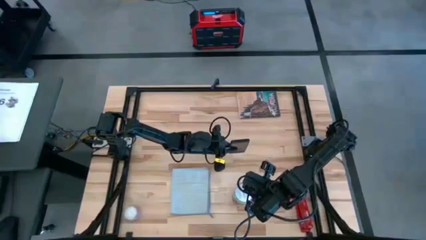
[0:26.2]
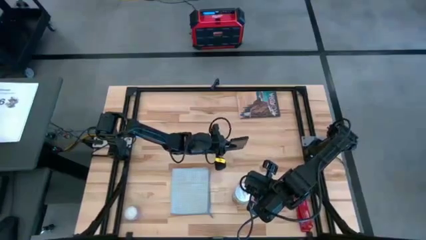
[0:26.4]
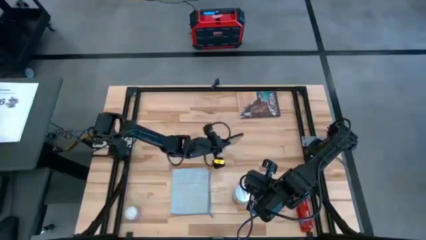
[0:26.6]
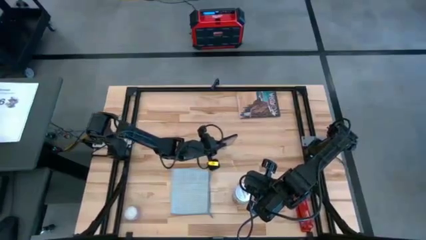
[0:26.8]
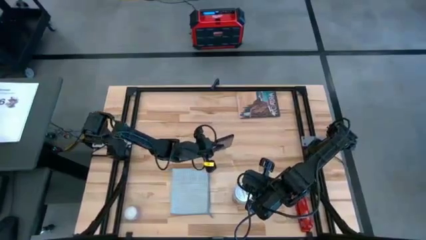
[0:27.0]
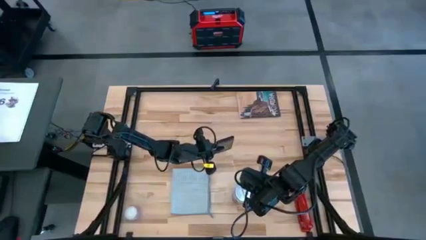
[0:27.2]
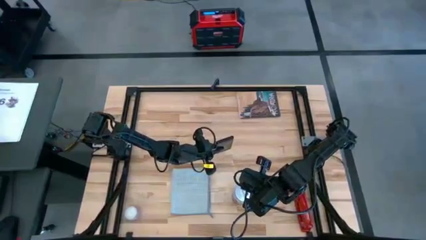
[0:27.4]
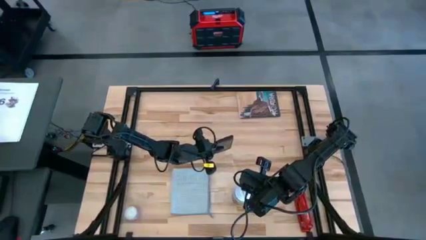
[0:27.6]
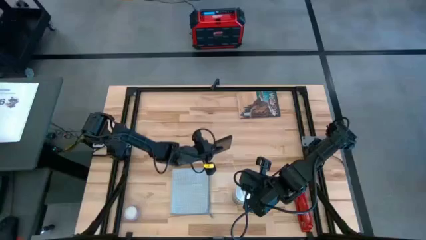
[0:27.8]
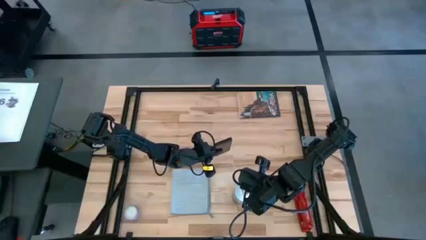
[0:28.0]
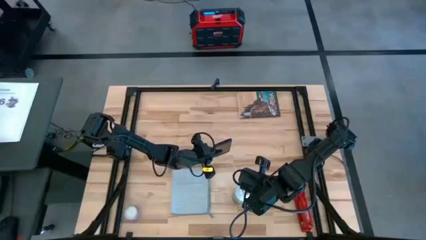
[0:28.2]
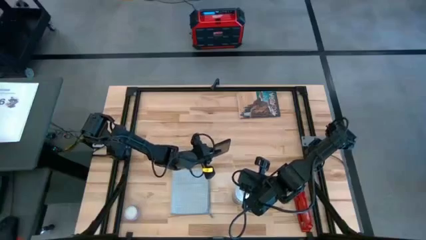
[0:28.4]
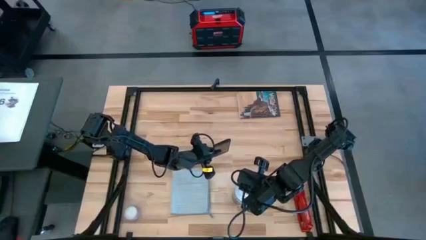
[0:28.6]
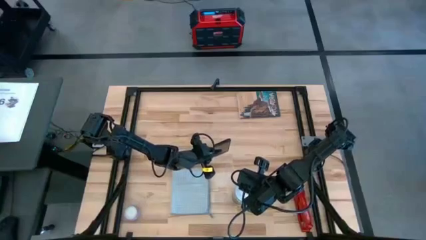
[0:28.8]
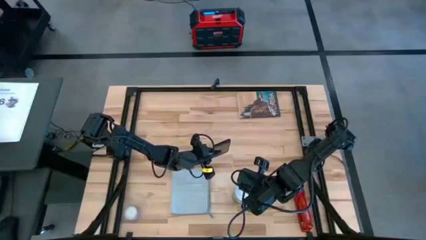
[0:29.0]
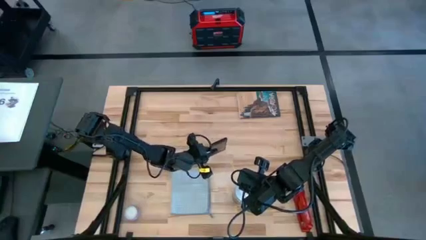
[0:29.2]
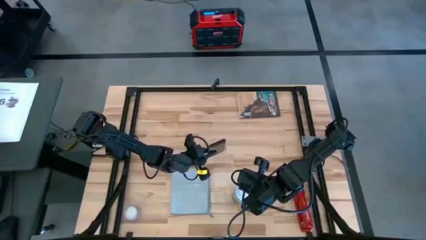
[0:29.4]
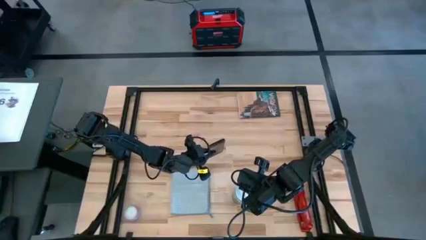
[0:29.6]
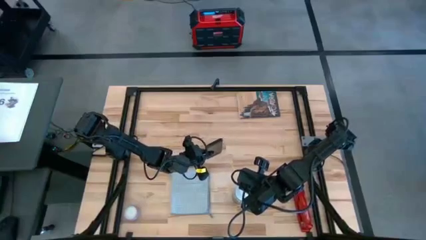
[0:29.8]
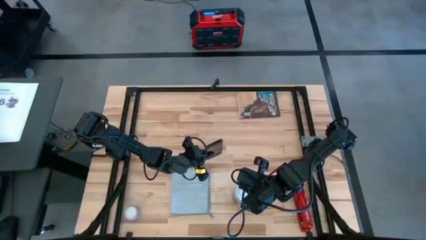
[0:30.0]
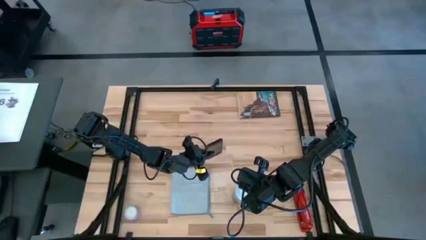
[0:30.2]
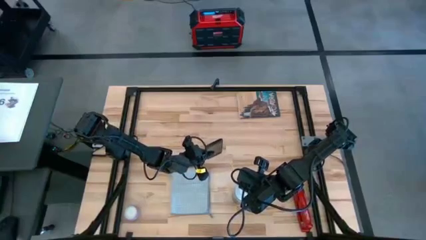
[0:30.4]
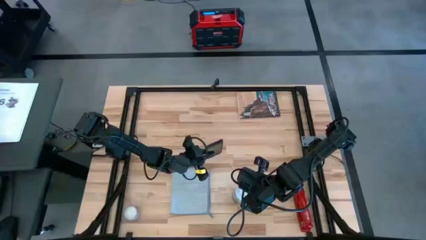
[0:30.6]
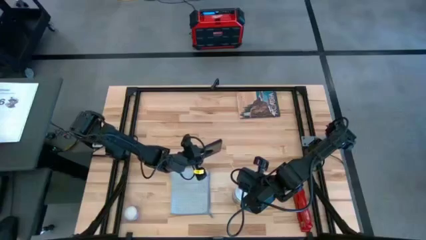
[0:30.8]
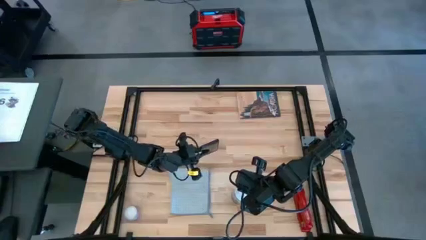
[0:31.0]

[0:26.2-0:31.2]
Task: Apply microfiber cloth
Spray the front of the black cellphone using the white spray bottle

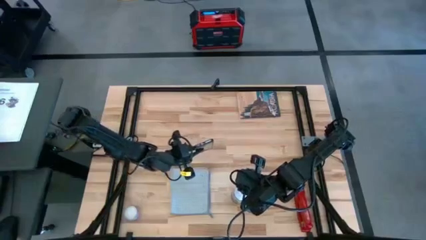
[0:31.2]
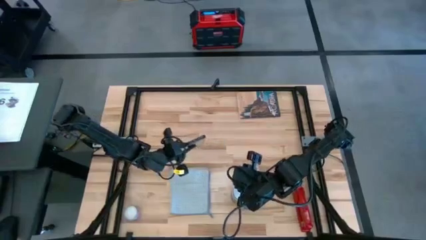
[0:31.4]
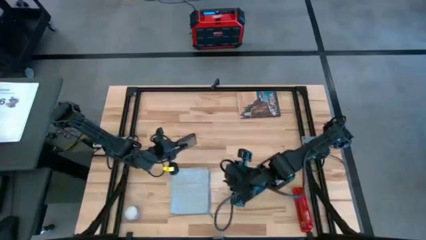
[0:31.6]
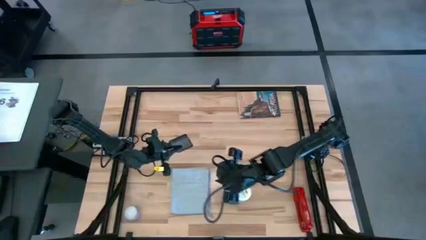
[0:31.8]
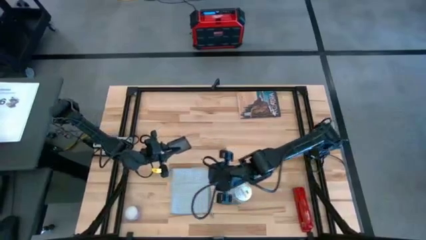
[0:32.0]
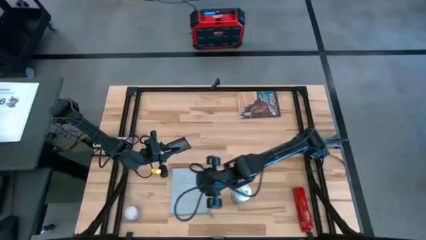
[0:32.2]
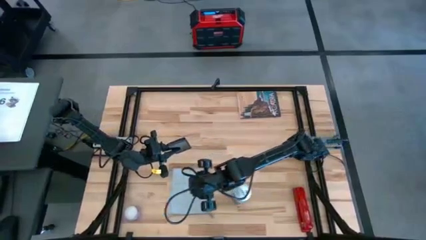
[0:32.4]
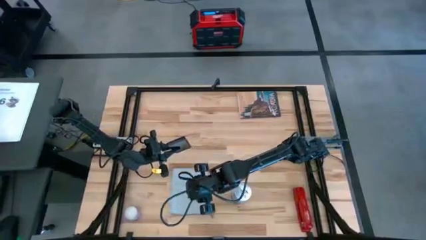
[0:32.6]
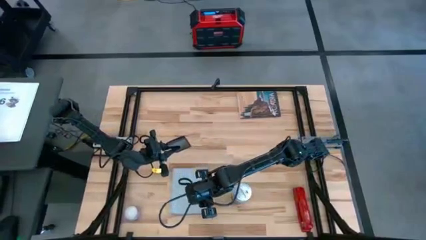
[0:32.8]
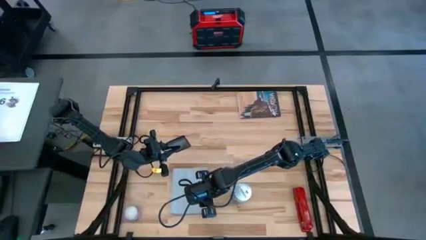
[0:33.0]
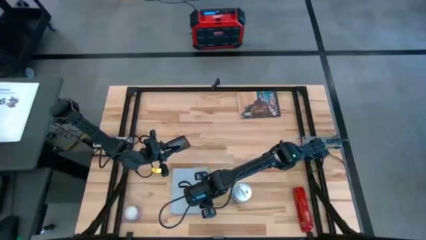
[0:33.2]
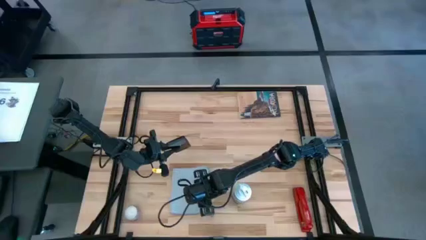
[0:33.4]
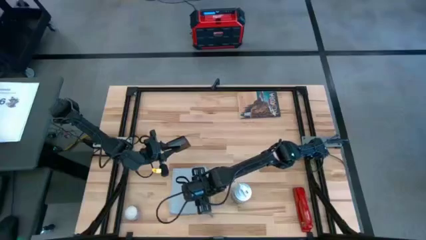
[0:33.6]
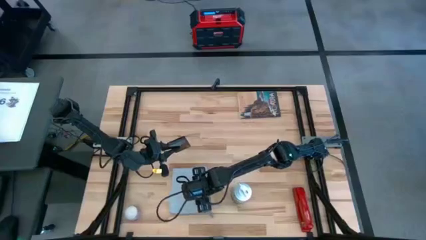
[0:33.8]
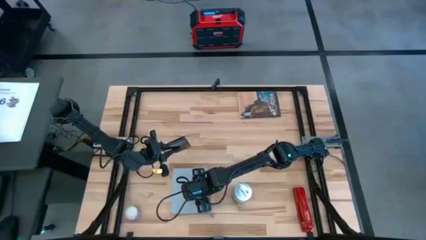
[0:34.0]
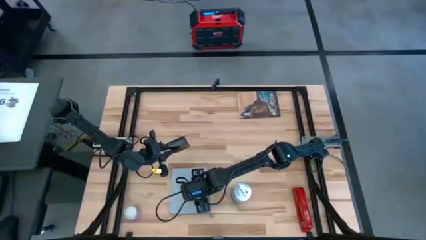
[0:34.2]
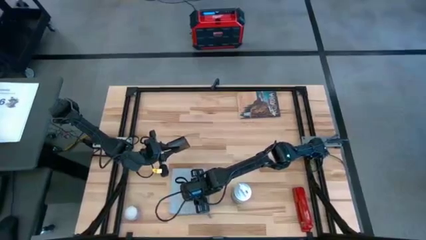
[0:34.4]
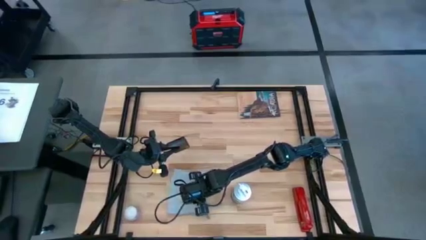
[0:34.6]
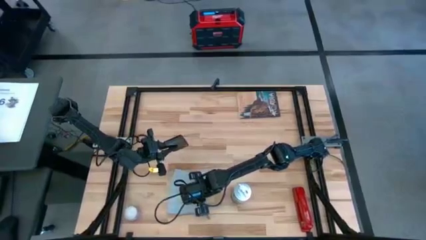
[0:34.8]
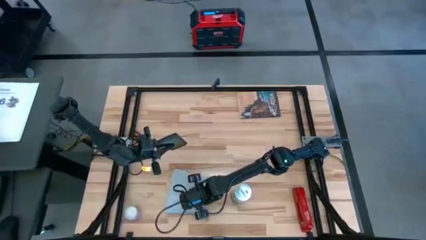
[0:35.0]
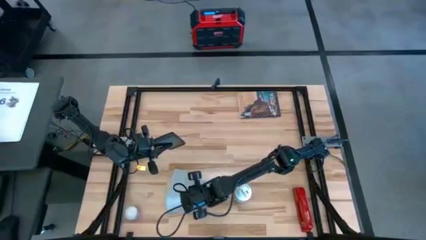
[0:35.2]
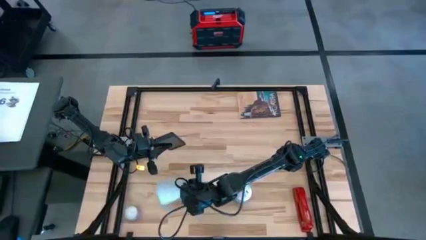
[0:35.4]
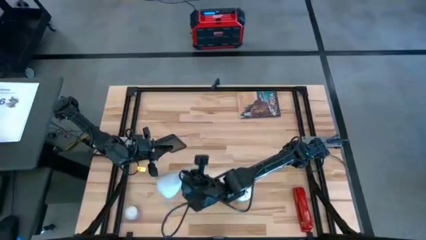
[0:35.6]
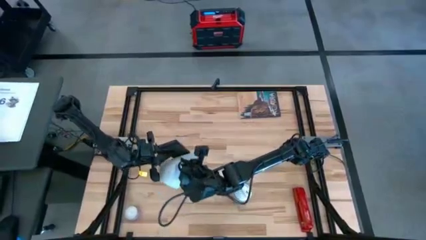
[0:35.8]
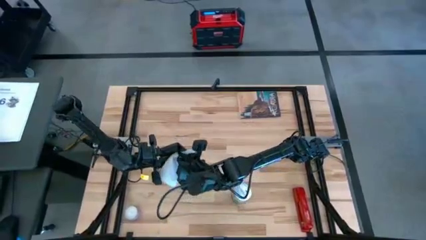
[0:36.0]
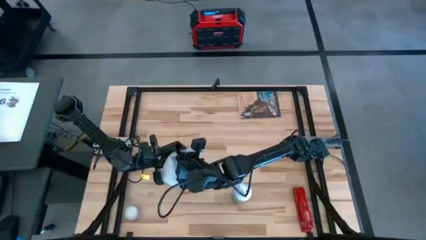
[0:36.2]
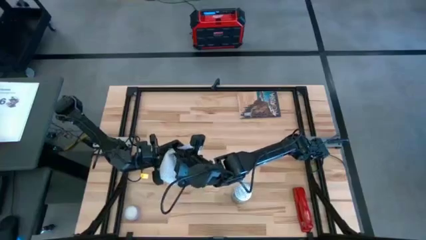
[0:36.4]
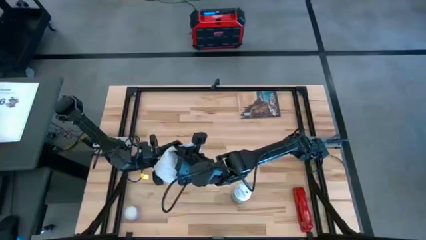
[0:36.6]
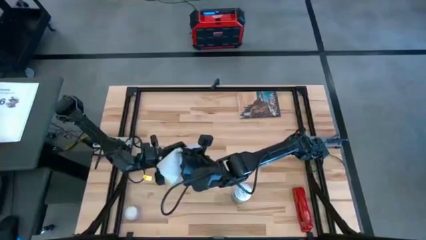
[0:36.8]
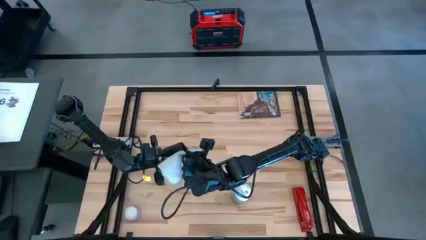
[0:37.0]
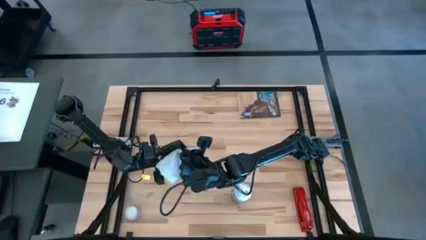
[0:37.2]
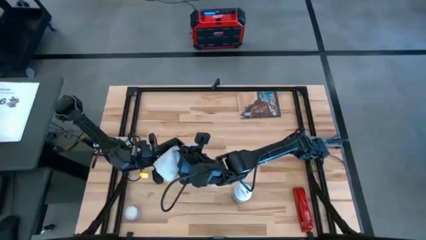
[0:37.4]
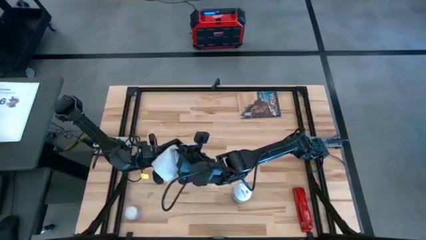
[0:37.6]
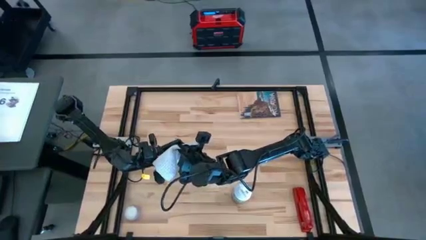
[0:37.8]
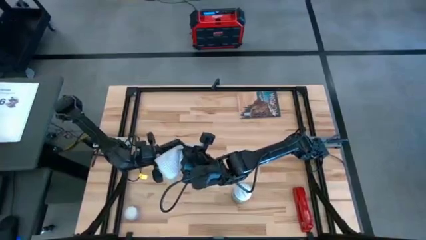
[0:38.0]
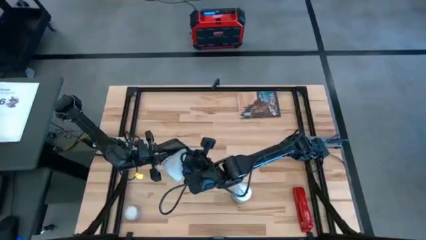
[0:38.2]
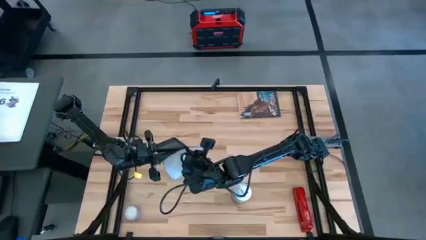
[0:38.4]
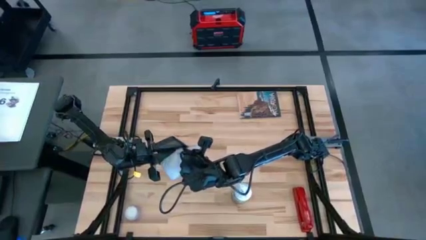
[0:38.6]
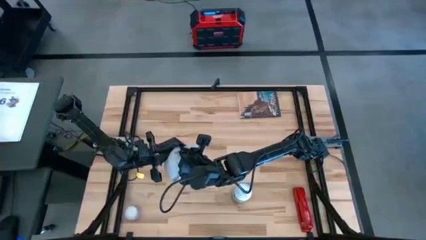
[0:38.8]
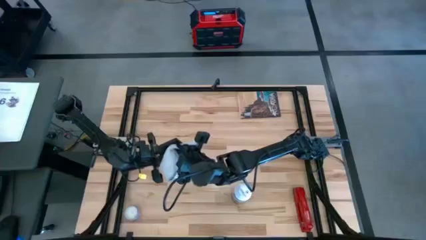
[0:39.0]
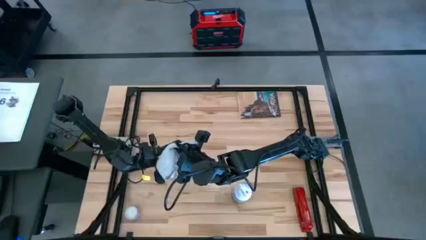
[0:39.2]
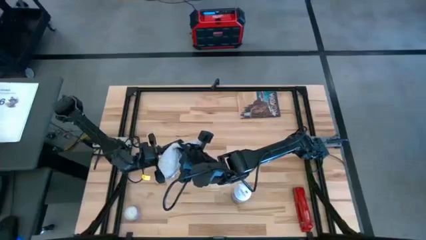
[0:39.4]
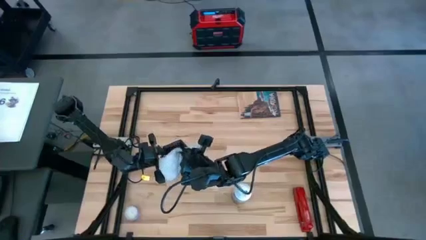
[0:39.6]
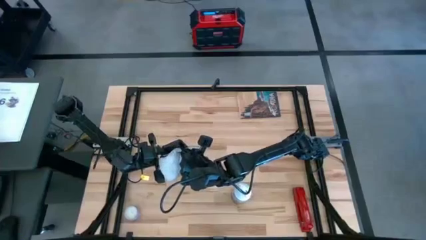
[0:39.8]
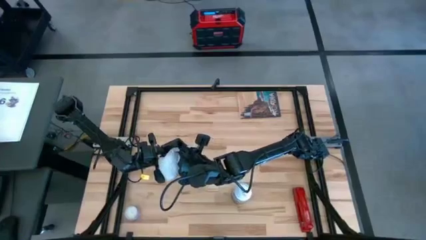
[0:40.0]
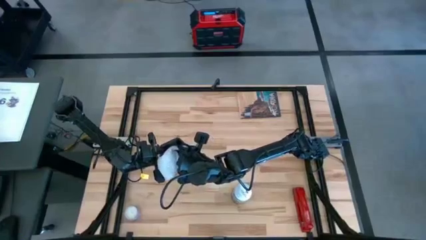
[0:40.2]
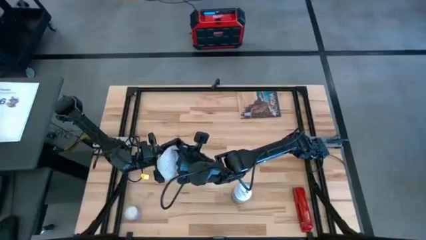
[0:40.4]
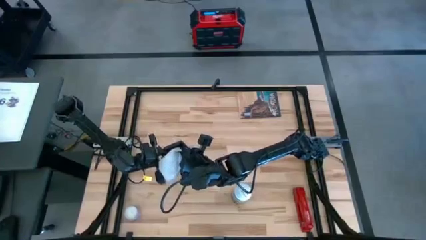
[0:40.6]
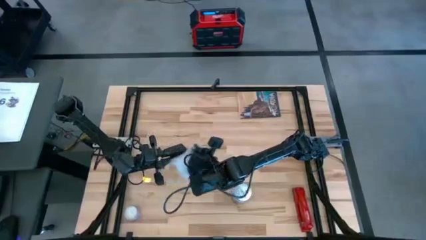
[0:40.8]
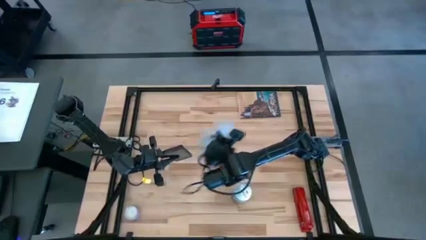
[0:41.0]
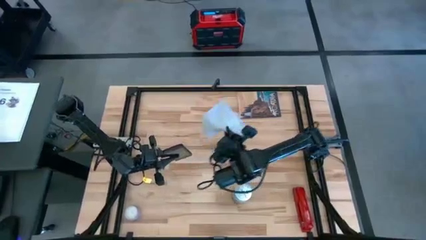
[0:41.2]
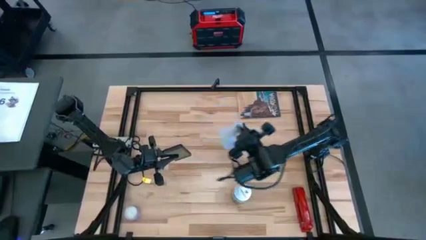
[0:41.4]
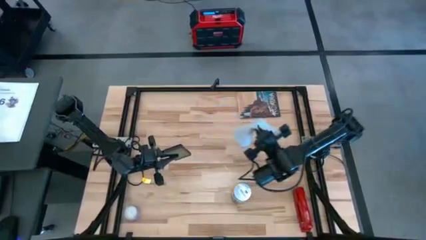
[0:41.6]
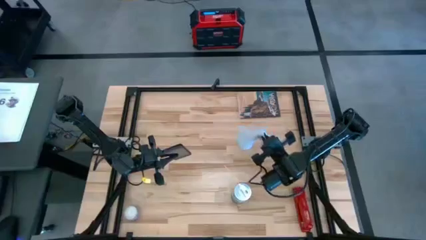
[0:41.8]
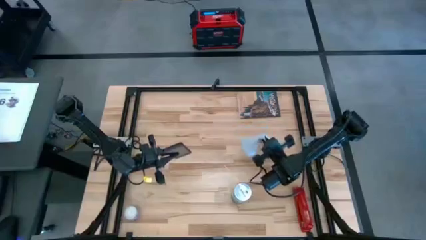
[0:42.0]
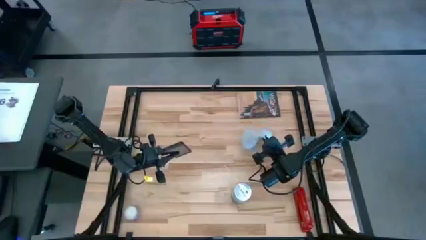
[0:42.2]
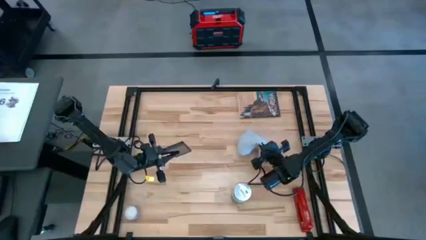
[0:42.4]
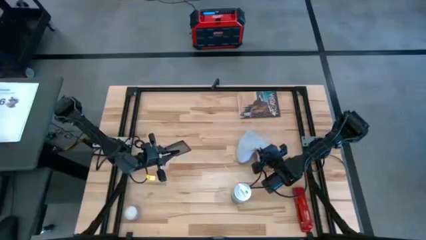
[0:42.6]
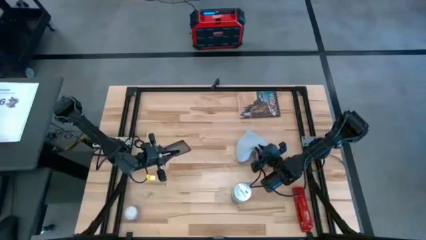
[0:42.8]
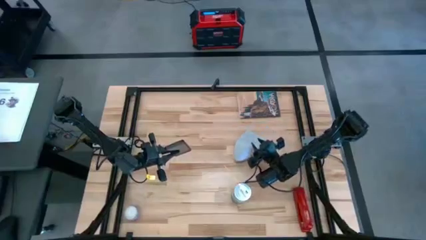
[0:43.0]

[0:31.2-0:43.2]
Wipe the front of the black cellphone with the gray microfiber cloth
